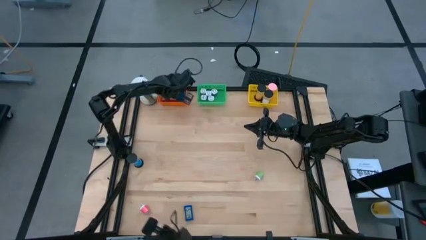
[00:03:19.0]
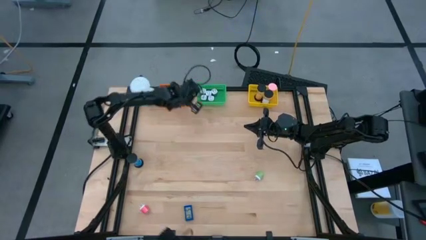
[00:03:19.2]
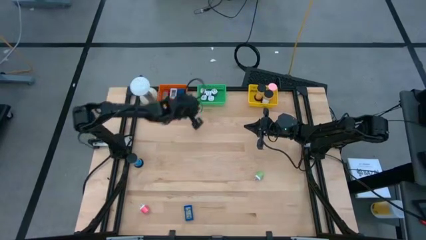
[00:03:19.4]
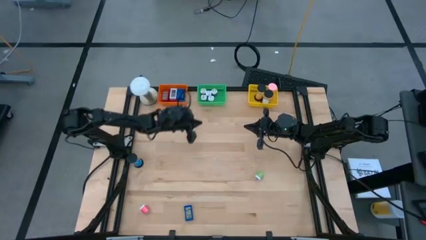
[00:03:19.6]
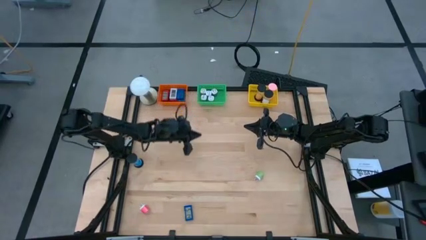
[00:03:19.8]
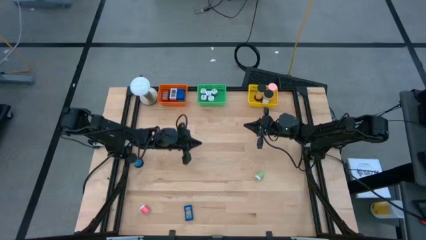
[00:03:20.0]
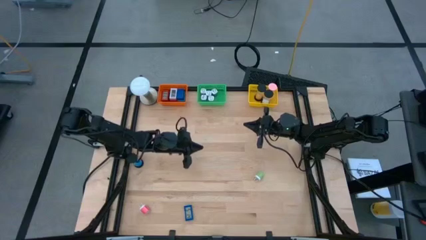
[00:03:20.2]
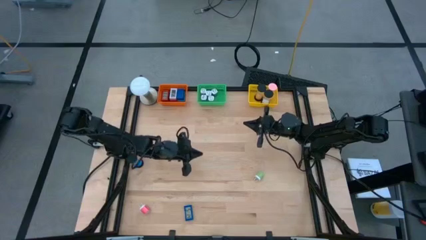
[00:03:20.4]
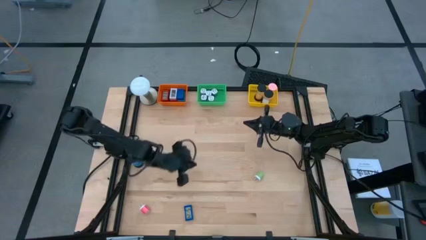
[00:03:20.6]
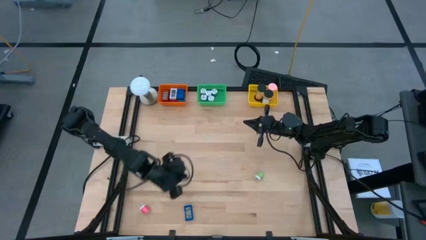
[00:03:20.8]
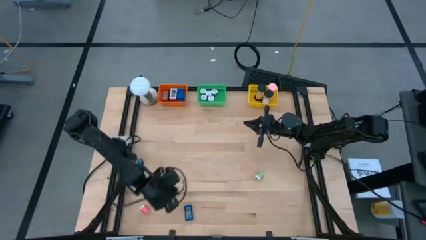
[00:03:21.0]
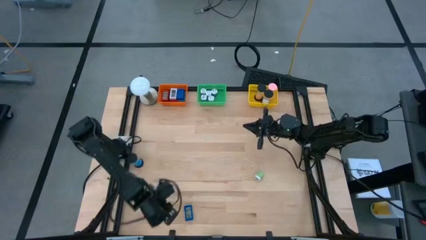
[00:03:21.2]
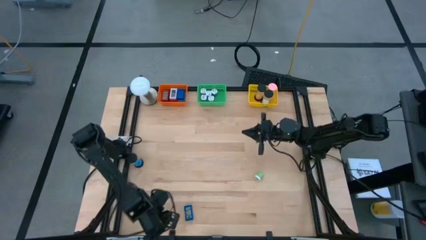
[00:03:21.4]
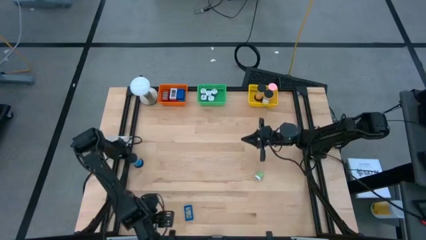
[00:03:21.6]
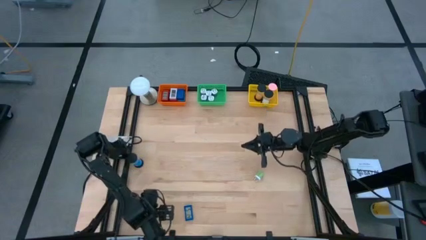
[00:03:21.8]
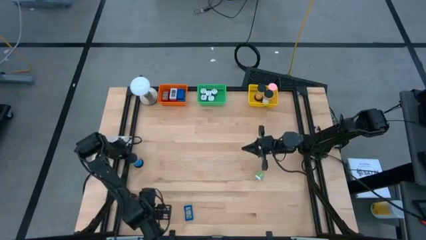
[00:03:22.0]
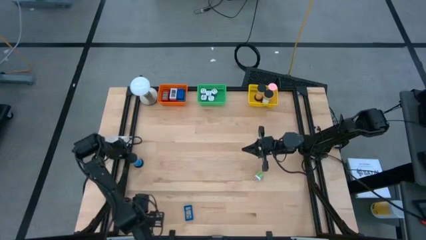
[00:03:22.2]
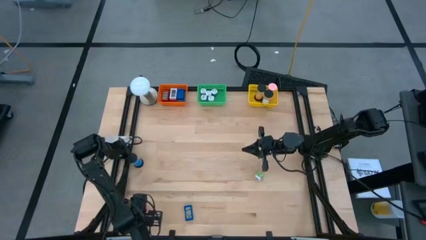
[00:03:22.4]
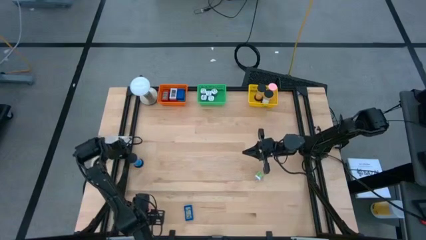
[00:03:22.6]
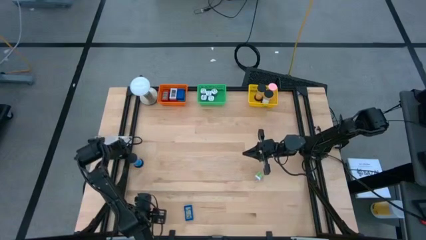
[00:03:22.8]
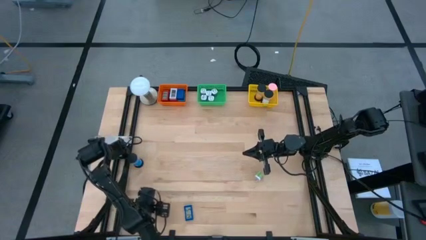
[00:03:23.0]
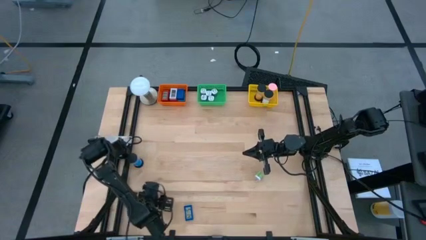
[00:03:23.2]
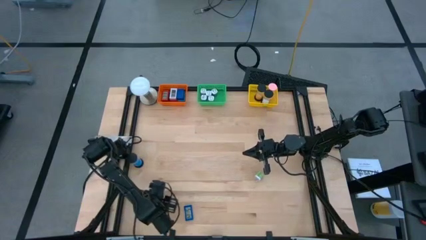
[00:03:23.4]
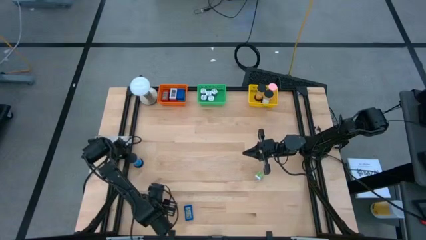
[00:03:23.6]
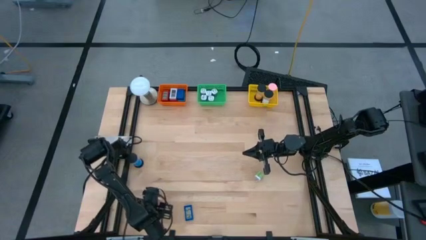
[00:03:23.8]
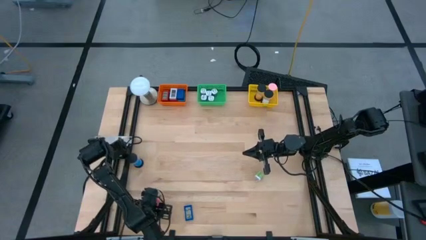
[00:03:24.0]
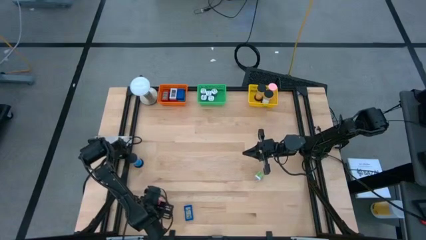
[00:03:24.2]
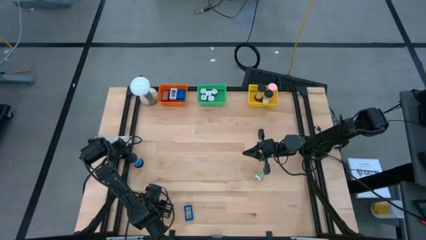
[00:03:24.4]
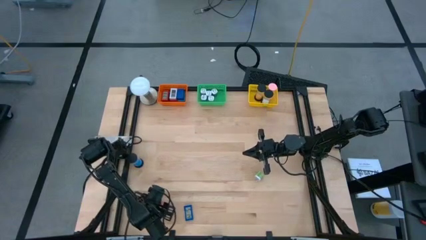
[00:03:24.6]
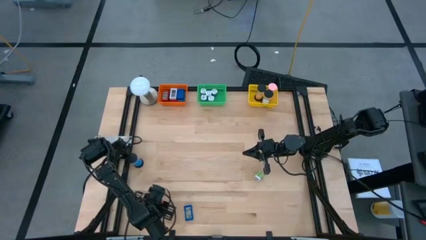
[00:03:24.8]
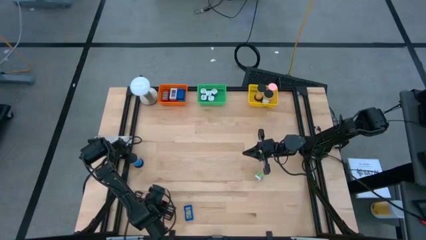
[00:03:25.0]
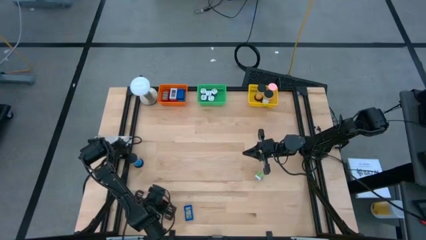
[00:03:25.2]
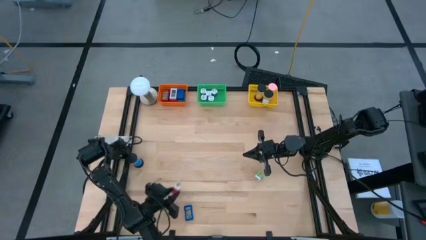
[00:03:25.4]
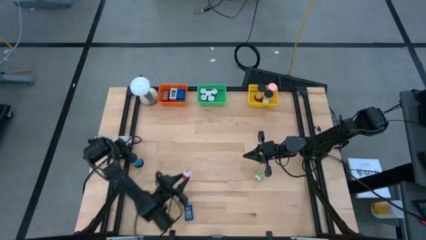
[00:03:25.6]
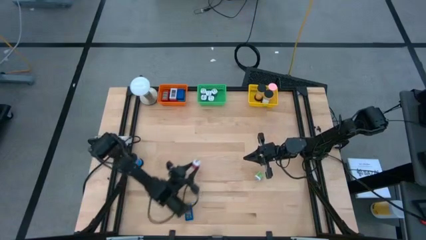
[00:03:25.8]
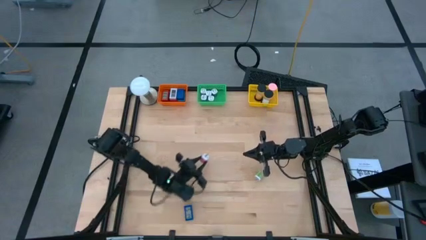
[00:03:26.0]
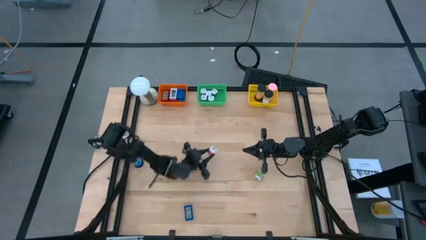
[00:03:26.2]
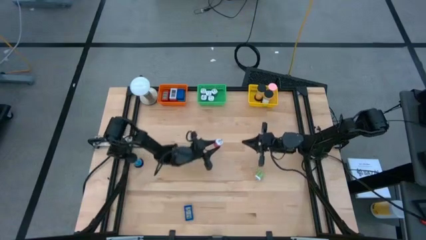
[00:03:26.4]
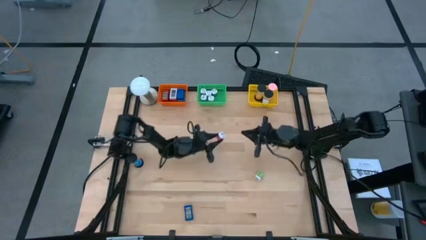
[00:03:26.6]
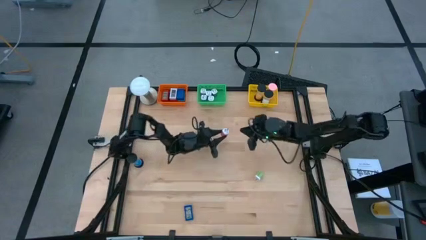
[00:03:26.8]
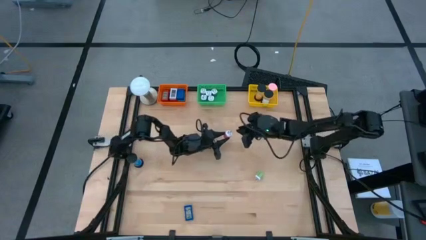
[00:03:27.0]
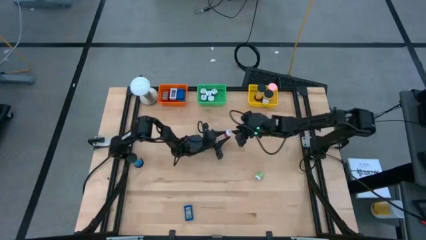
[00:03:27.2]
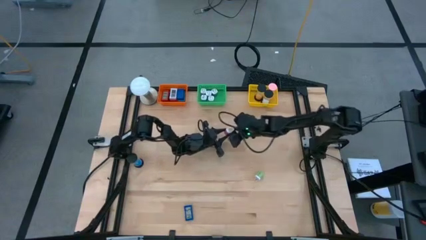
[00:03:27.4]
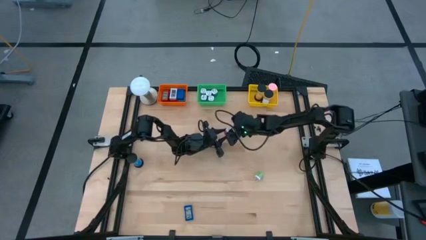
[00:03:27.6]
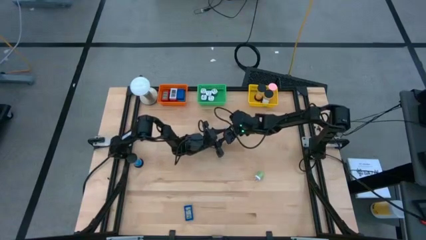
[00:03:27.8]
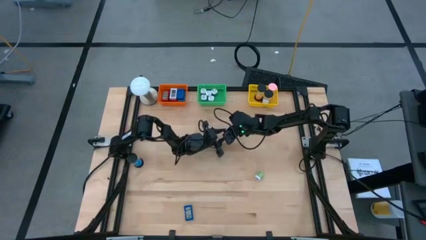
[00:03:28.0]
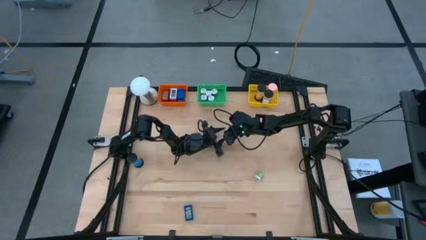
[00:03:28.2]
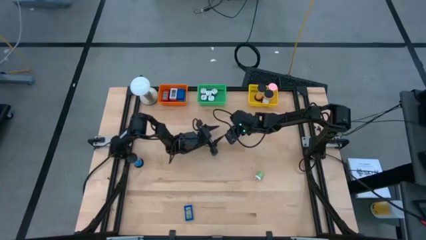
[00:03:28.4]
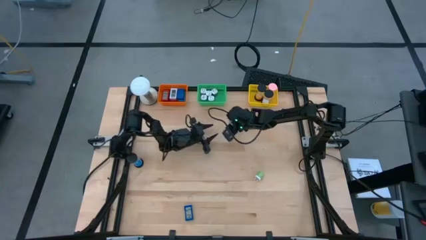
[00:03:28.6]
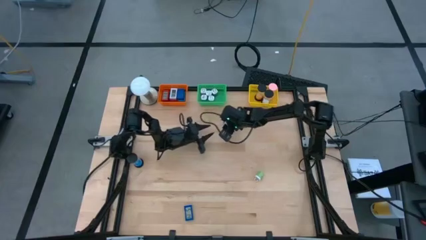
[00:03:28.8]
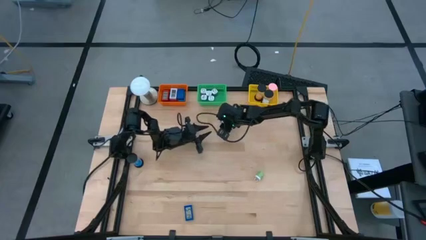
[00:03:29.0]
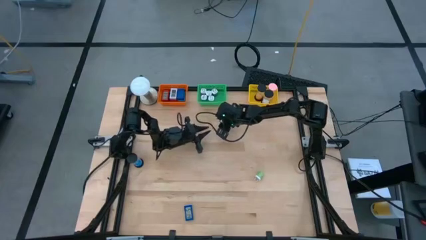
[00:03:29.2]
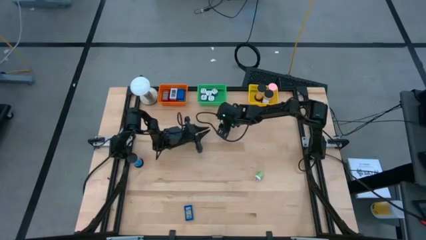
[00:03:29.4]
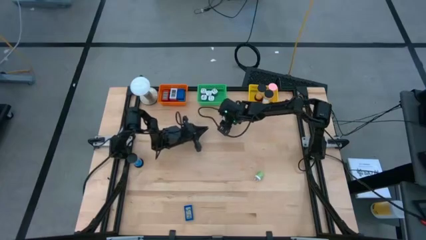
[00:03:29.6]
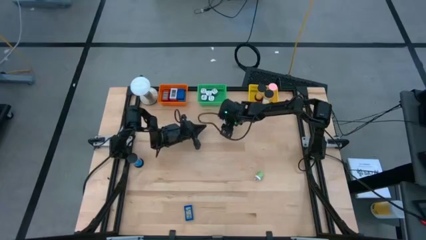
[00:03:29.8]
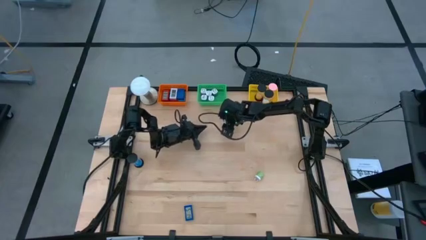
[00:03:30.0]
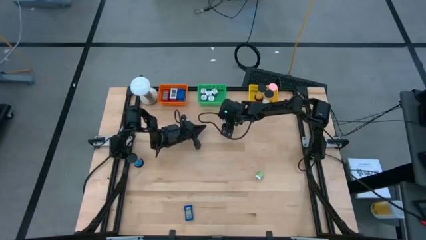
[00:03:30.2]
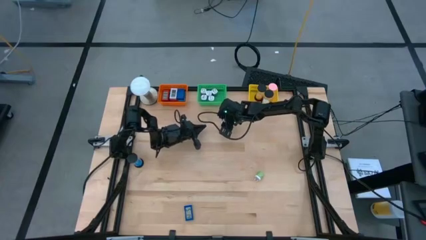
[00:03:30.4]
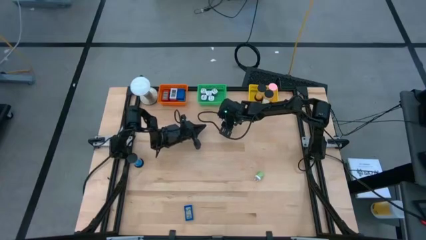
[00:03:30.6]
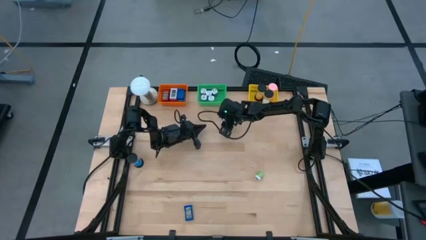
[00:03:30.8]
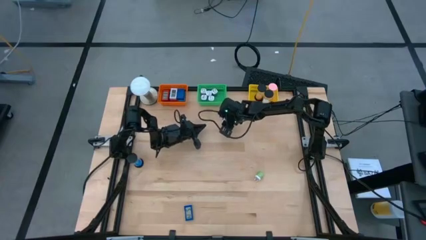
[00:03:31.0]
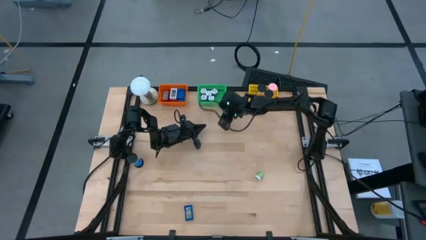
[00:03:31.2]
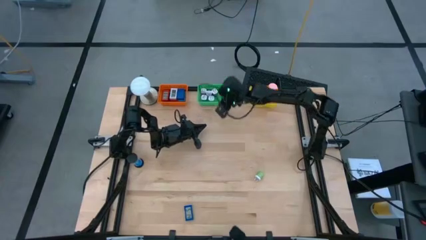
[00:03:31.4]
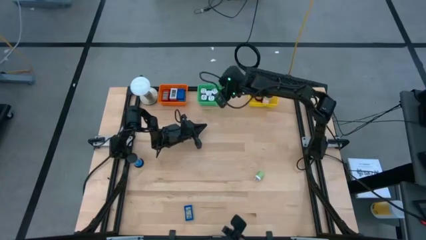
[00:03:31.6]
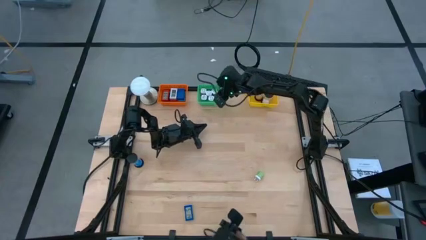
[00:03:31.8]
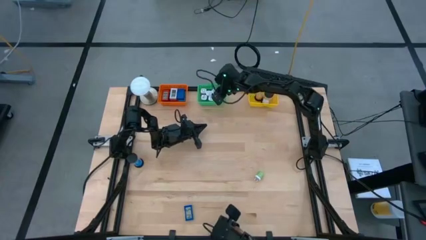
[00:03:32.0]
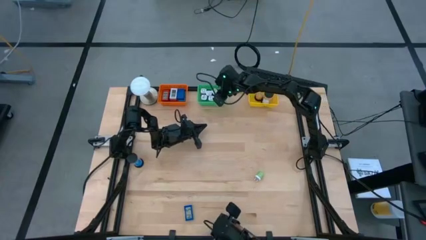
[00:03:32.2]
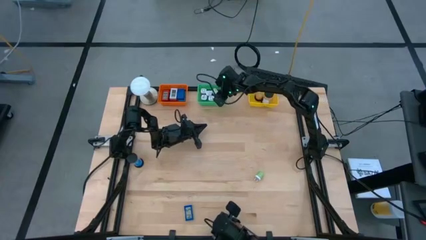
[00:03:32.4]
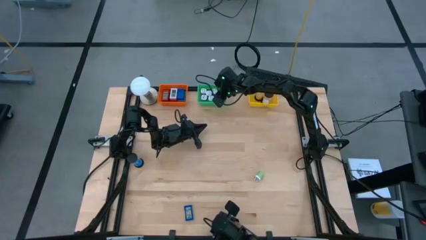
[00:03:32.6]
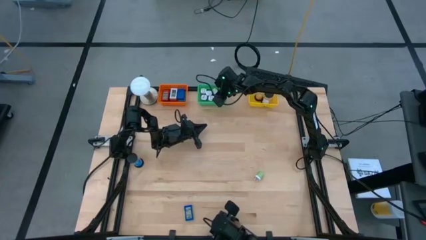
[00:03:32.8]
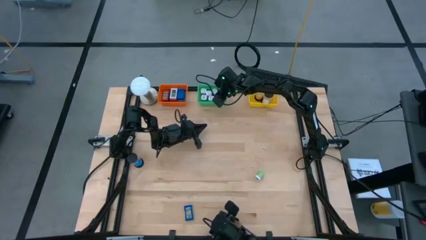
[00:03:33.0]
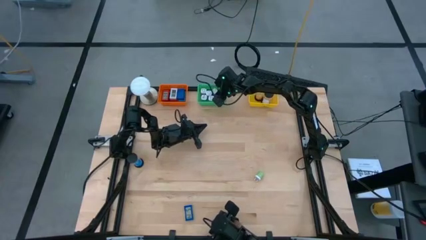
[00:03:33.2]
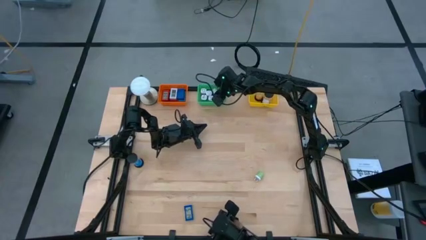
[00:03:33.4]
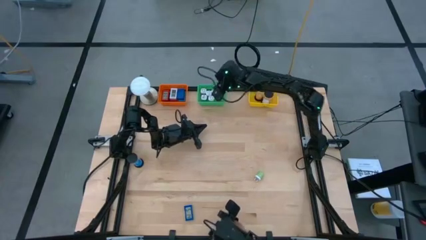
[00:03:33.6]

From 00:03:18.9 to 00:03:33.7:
Task: Pick & Place Office items
Put the red charger adapter into the green basket
